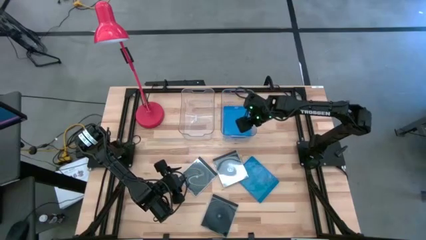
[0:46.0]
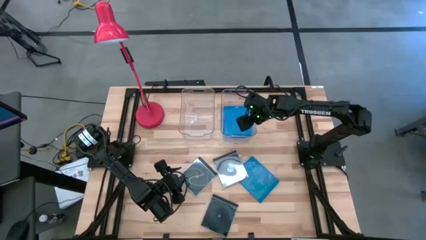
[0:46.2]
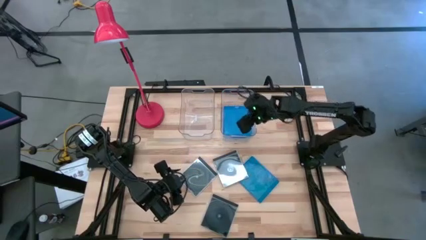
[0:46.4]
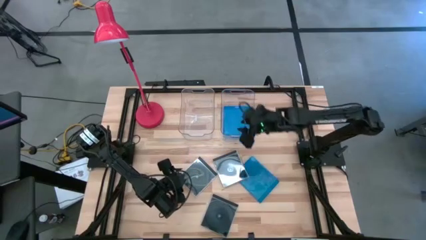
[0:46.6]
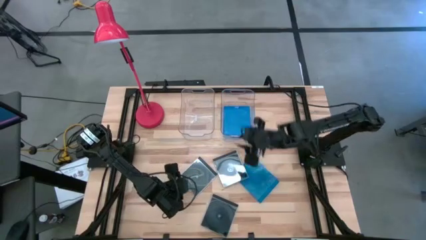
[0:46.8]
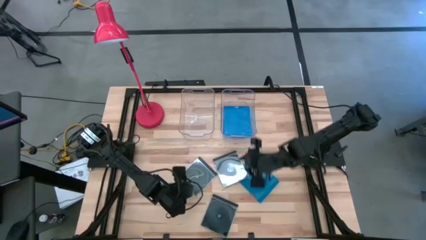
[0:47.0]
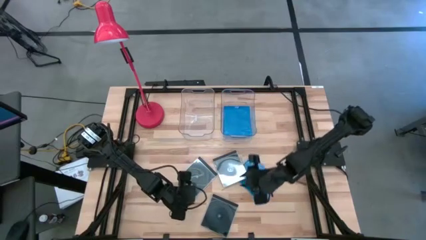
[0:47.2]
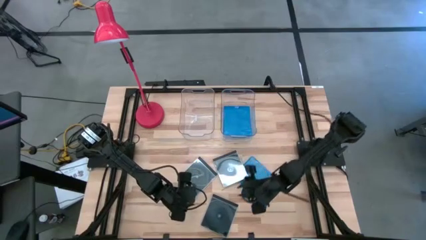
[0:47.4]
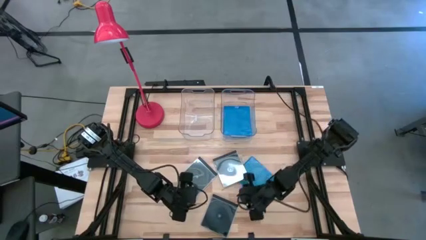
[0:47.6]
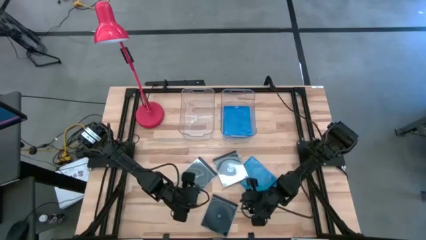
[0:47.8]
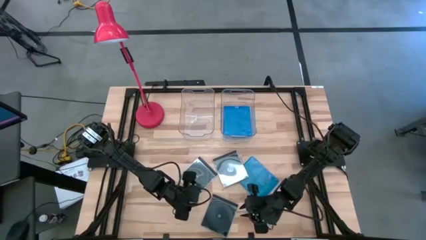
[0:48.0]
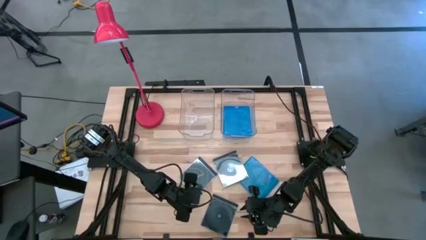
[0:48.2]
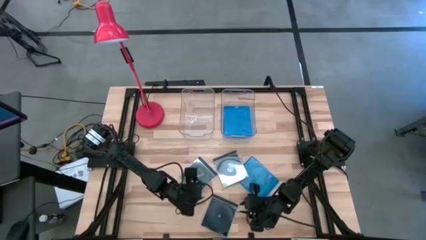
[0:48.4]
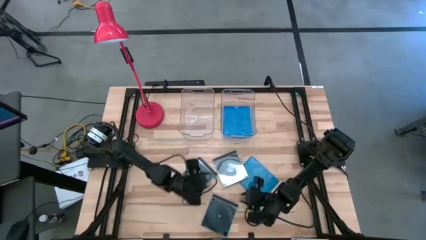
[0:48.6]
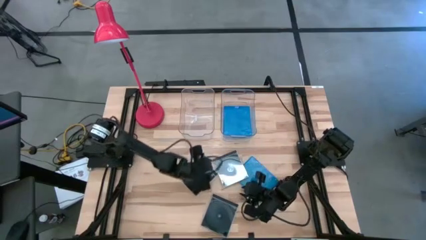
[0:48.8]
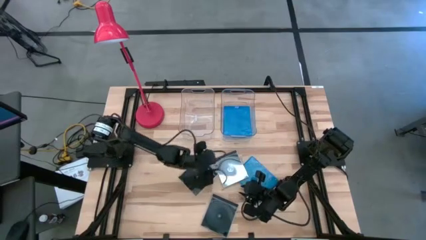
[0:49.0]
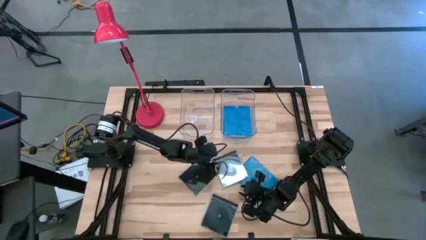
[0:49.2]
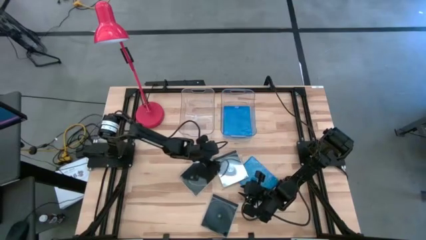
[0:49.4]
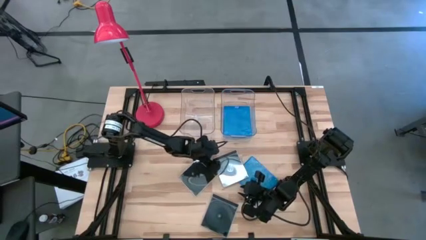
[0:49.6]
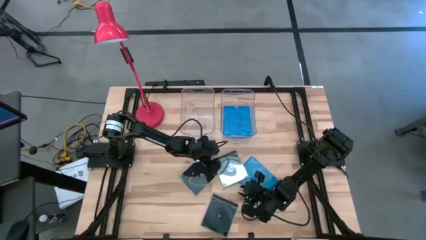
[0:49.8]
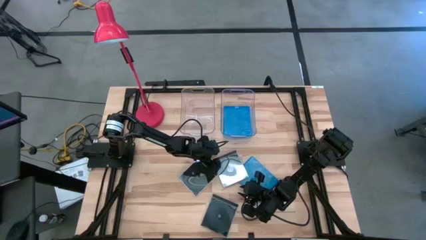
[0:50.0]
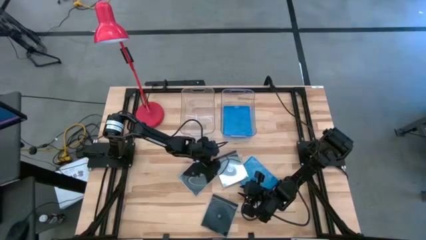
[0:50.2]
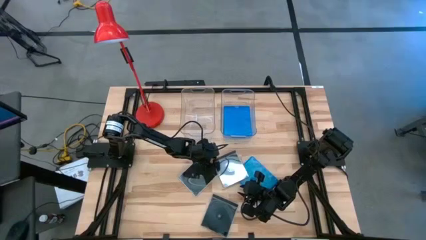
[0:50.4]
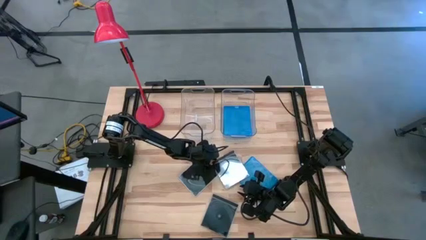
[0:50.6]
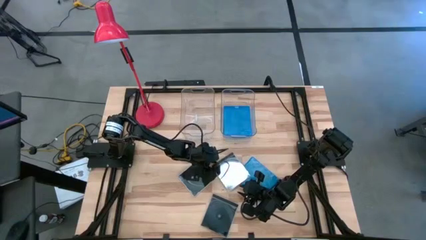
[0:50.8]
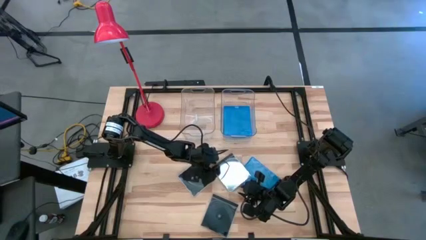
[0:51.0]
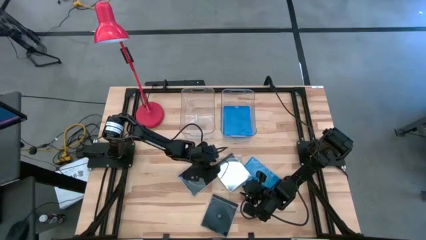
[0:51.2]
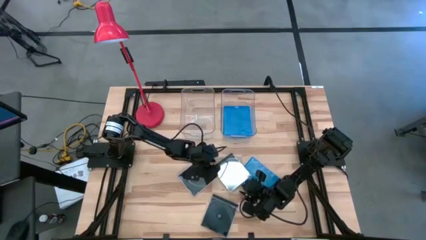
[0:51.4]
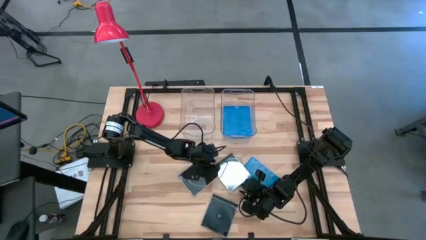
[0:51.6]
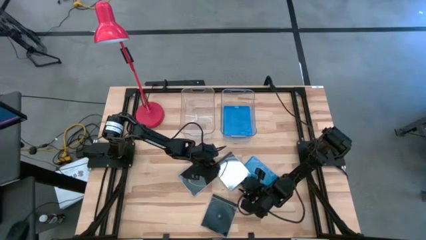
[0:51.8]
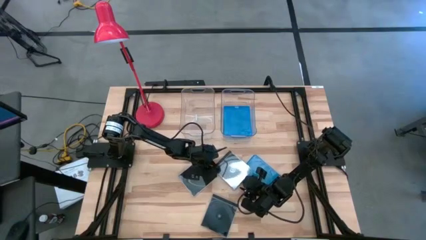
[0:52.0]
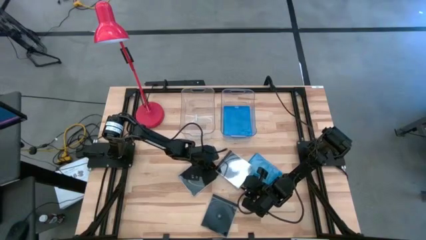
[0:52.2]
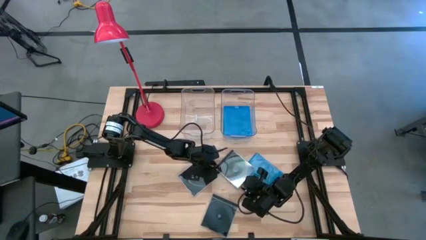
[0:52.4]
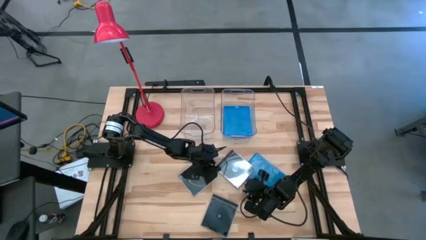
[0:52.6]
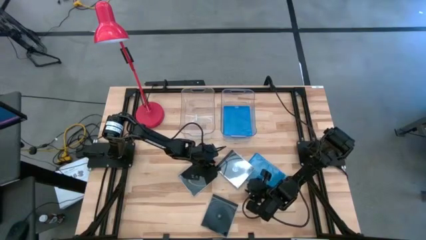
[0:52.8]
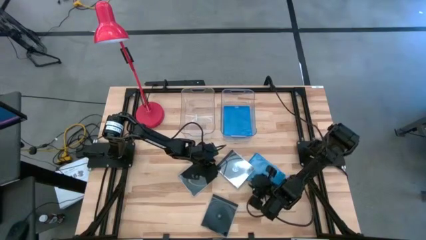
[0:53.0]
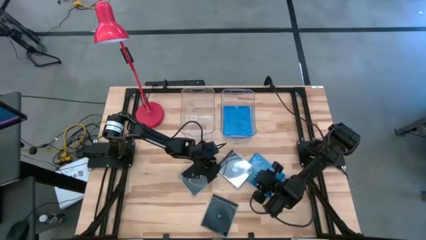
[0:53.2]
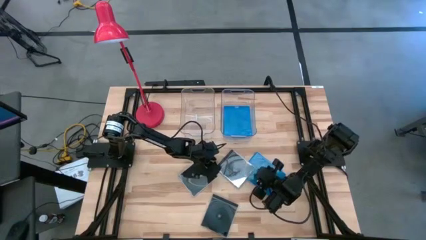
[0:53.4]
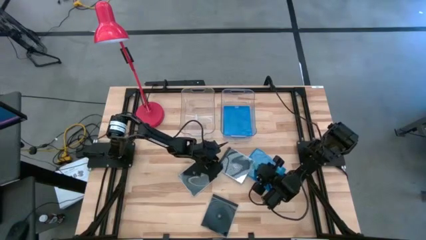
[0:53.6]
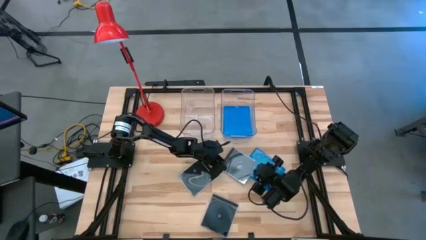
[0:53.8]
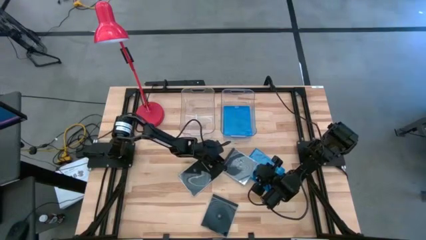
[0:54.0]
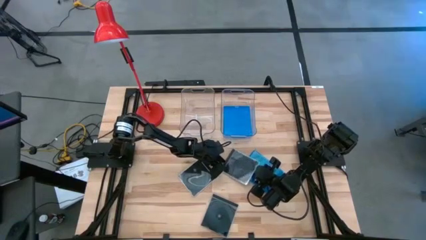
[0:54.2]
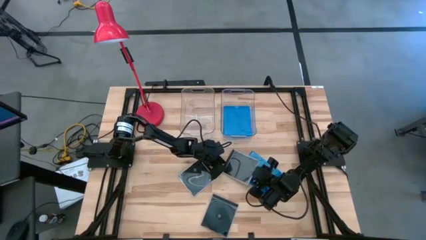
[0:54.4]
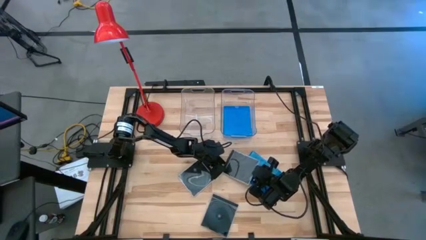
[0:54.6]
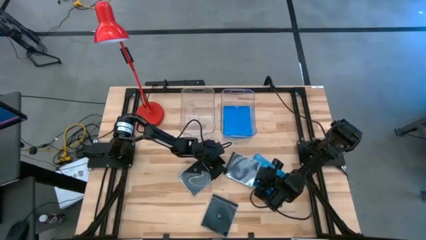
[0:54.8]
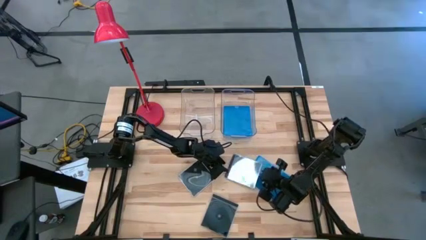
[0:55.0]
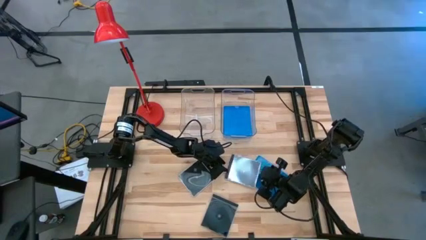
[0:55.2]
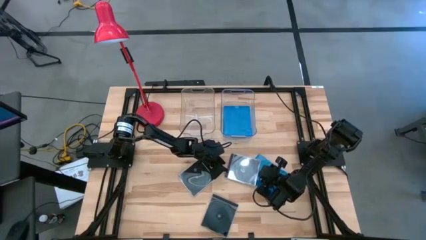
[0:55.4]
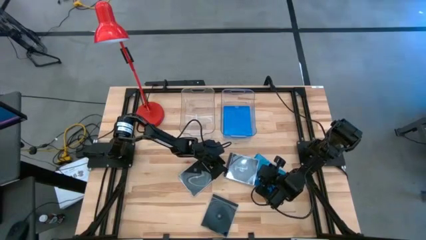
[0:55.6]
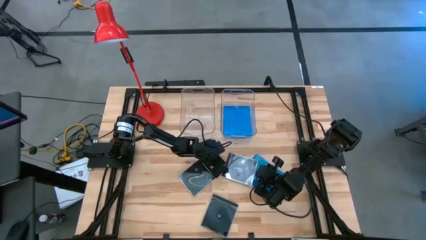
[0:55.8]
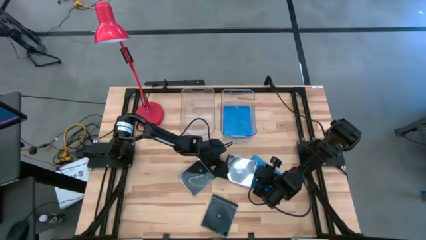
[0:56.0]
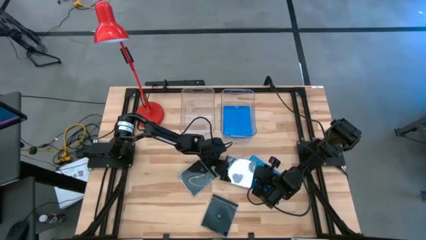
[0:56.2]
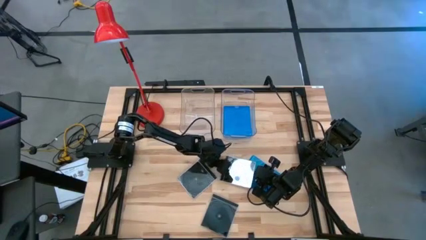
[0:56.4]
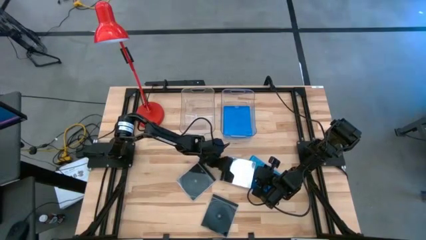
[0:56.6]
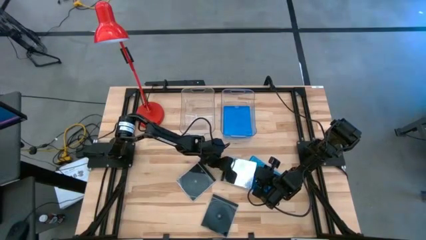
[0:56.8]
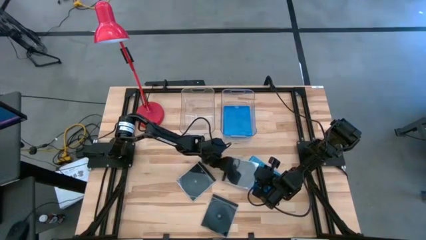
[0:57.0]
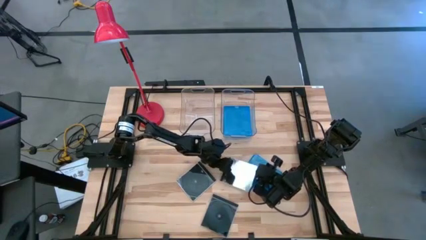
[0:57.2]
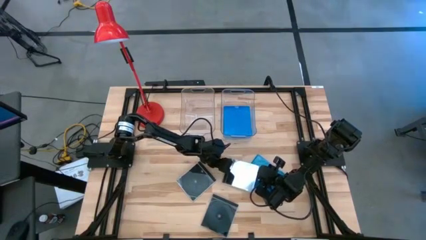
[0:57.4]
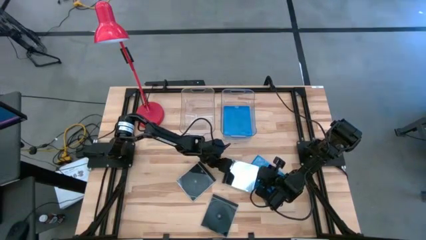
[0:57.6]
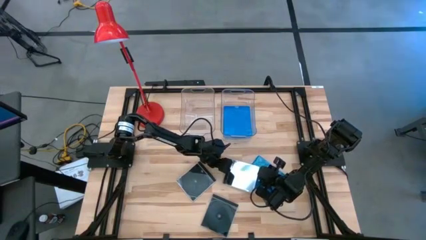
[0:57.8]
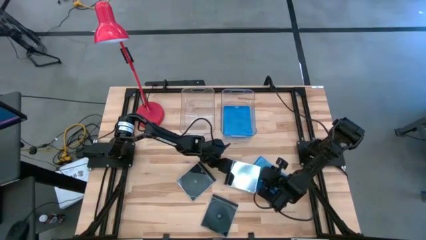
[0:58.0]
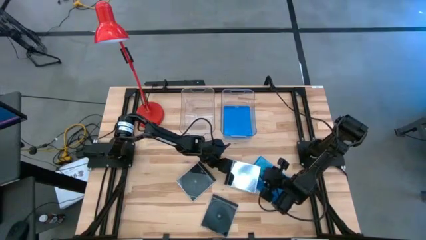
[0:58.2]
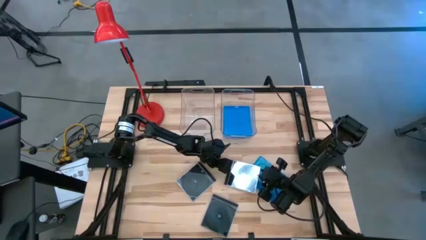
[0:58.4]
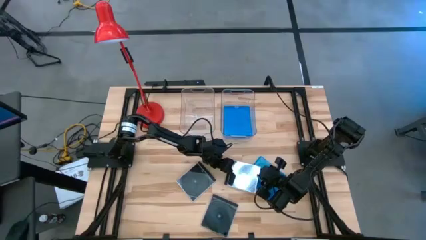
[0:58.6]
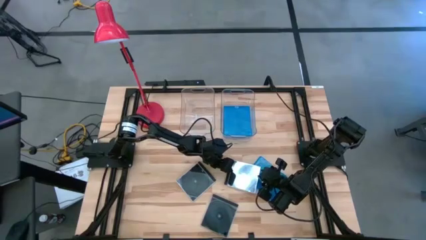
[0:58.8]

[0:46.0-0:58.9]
Task: Pick & place jewel cases by type
Put the top right black cd case into the left transparent bin

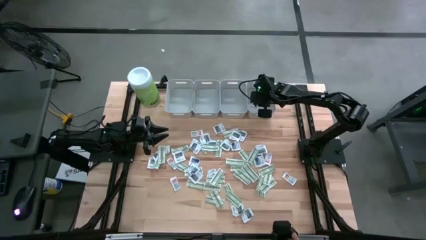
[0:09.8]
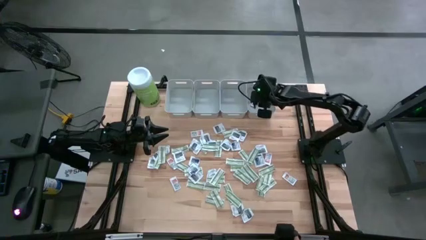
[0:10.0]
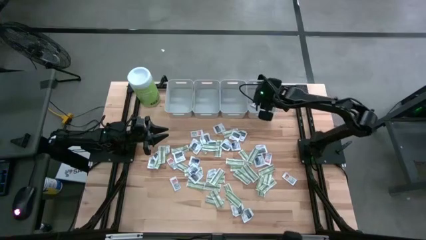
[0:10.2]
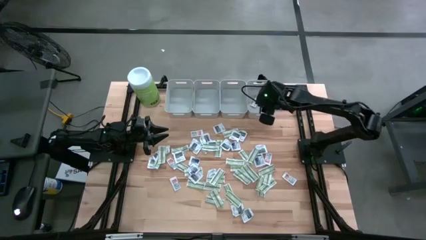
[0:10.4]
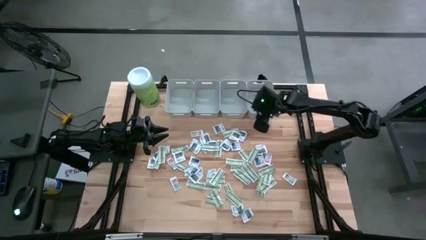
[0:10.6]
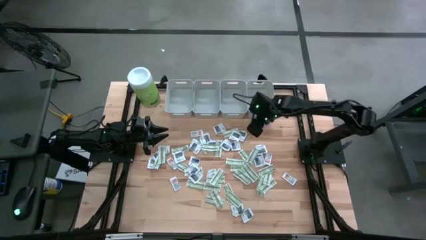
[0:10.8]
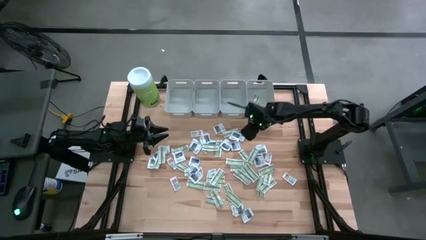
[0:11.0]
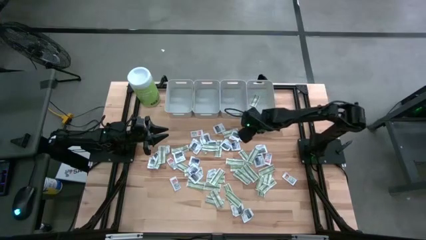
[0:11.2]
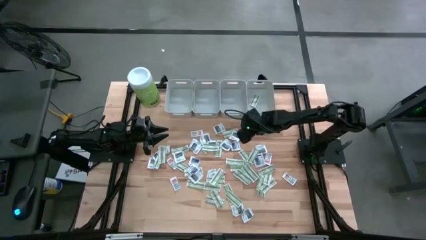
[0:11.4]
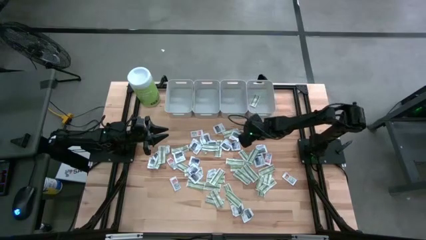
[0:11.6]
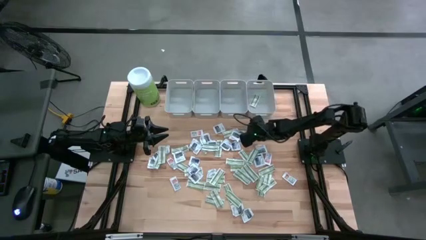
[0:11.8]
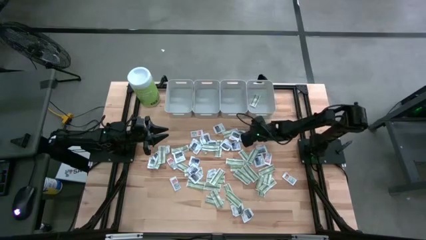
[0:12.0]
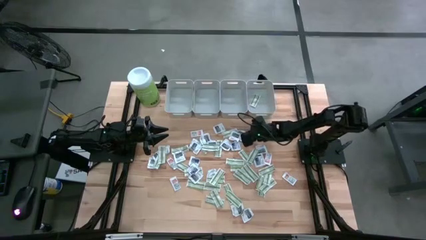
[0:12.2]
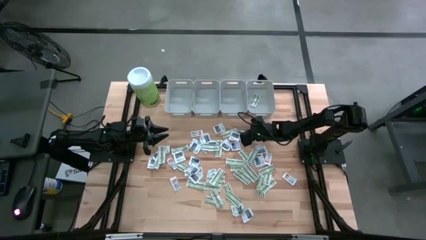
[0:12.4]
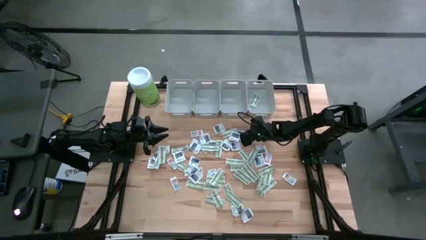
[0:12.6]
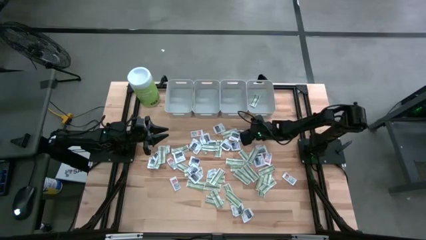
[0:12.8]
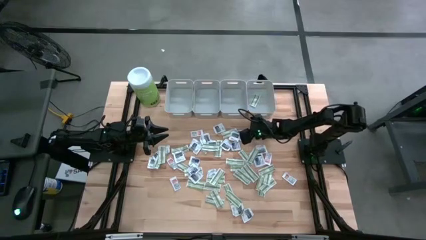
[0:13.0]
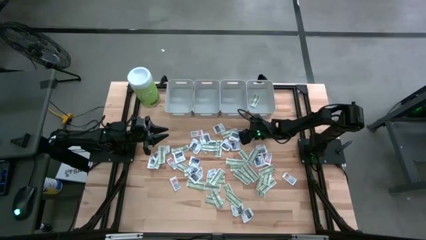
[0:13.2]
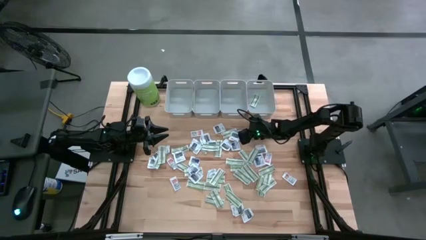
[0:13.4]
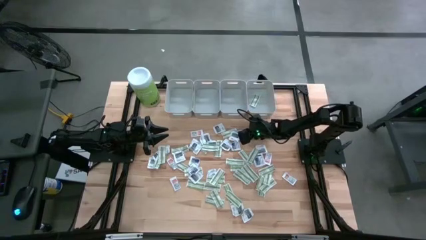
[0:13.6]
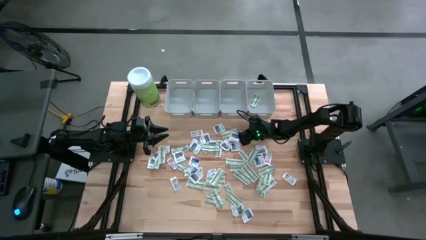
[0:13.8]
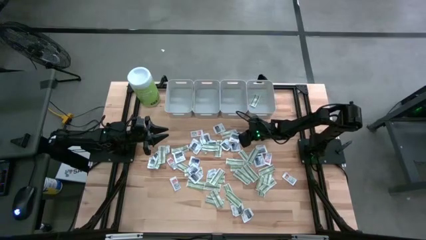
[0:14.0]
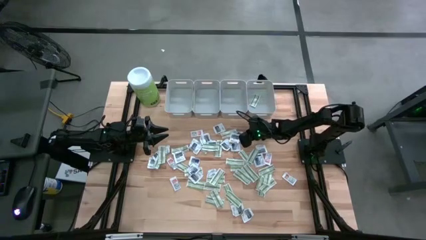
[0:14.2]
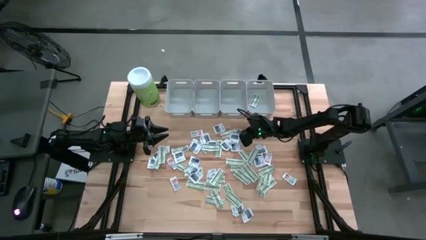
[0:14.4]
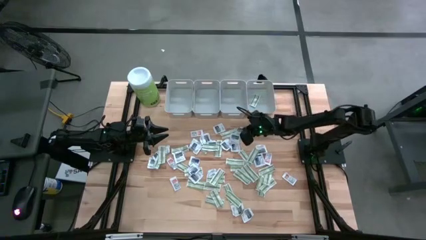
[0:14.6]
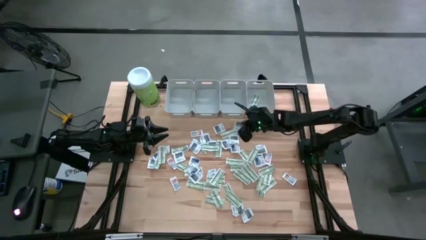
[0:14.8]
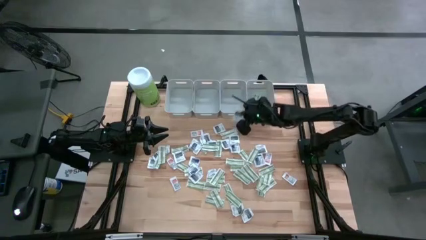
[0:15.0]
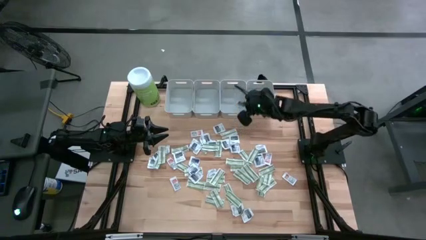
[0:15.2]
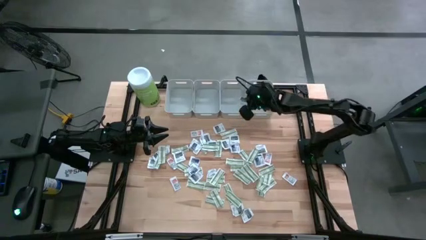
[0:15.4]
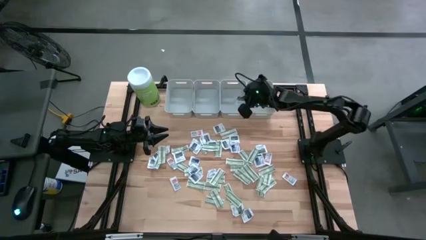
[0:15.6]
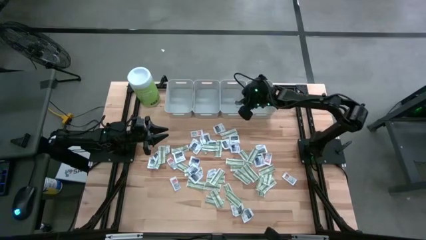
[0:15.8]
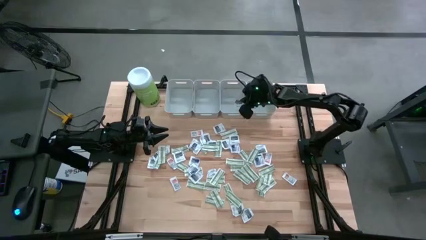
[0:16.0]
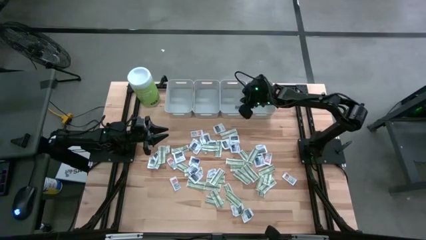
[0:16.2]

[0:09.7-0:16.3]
Task: Pick & Place First Aid Supplies
Put the towelette pack into the middle right gray bin
